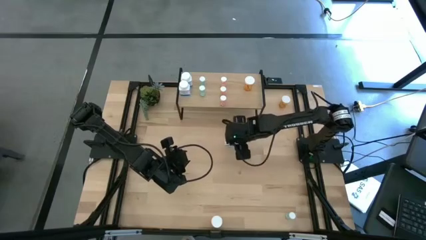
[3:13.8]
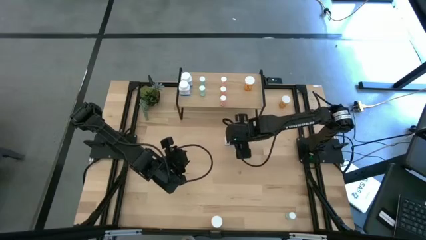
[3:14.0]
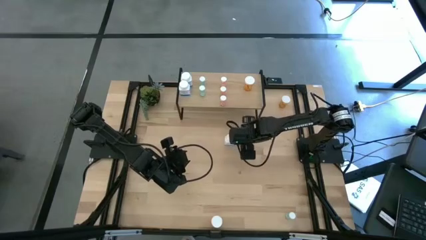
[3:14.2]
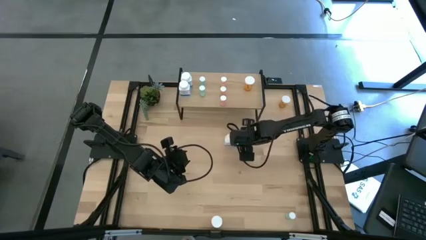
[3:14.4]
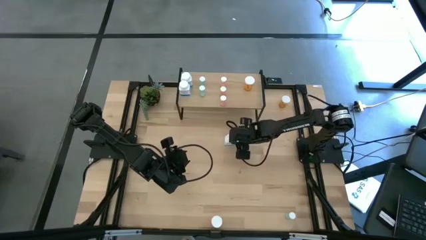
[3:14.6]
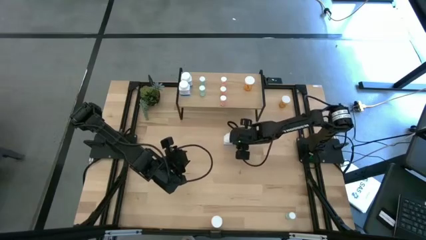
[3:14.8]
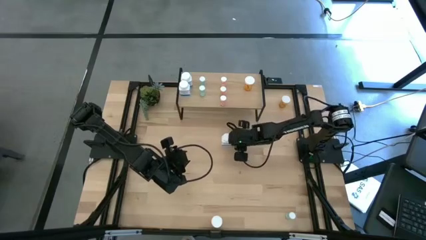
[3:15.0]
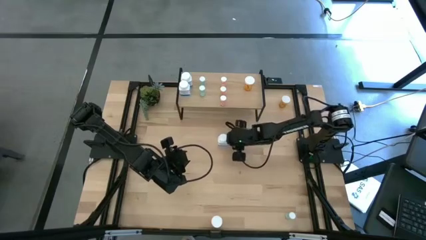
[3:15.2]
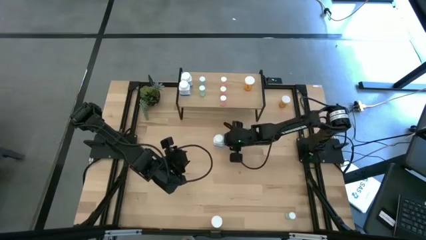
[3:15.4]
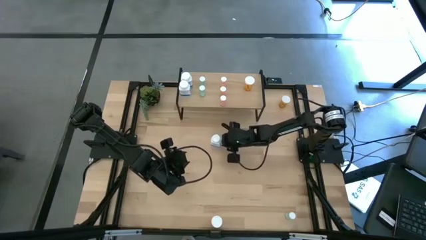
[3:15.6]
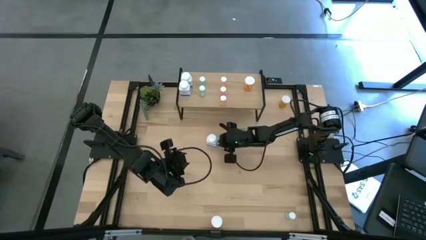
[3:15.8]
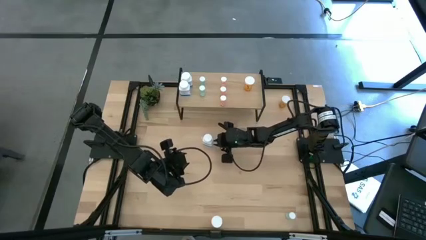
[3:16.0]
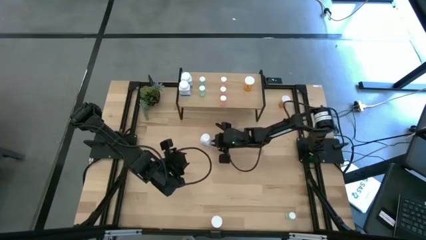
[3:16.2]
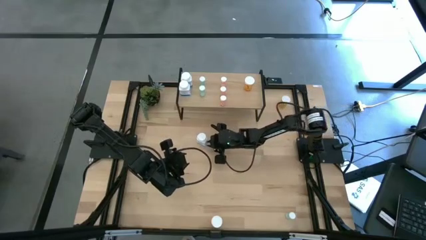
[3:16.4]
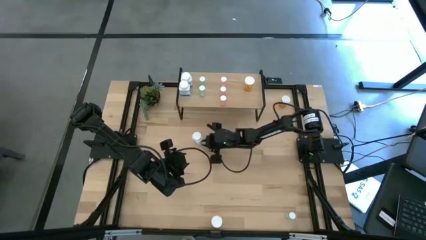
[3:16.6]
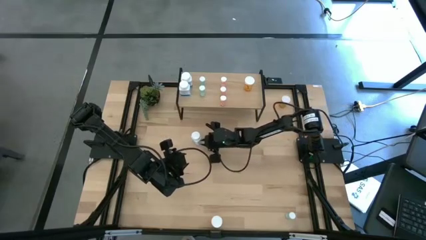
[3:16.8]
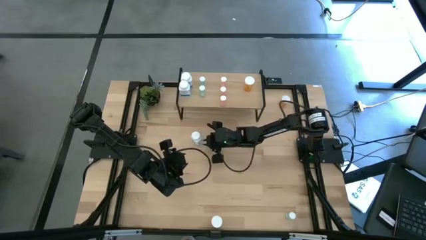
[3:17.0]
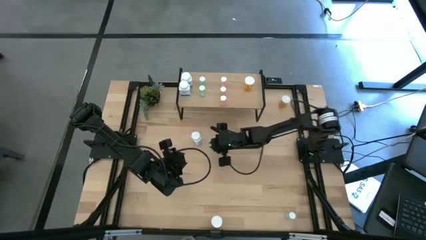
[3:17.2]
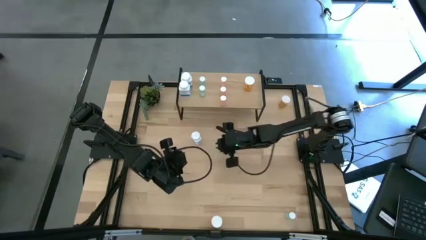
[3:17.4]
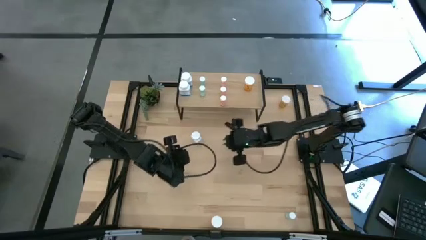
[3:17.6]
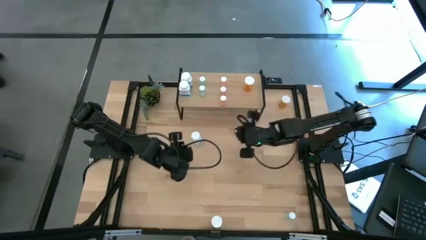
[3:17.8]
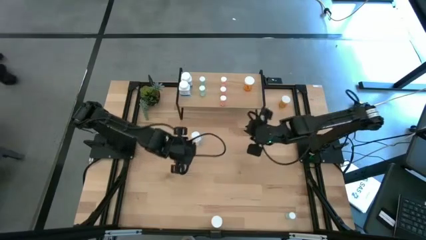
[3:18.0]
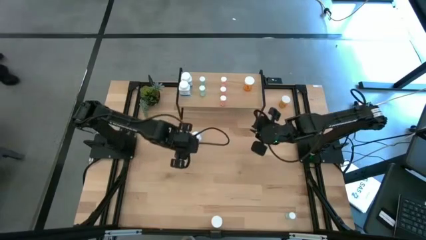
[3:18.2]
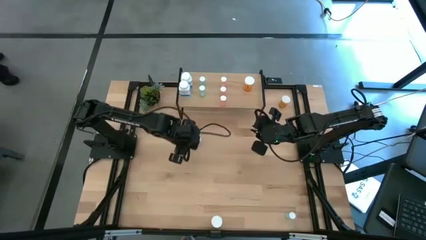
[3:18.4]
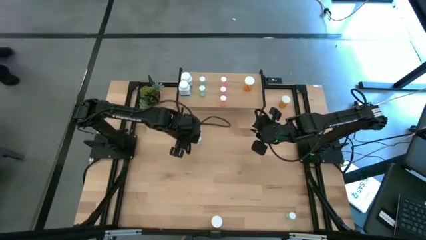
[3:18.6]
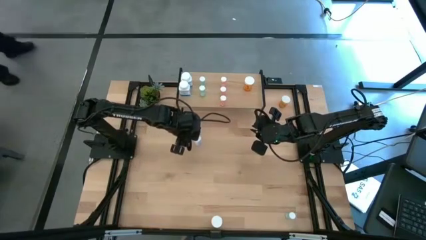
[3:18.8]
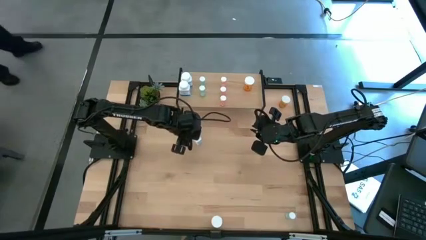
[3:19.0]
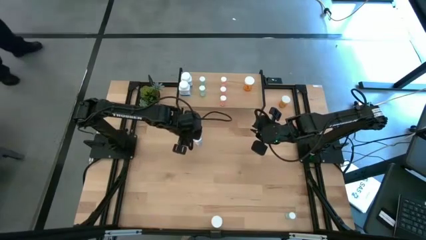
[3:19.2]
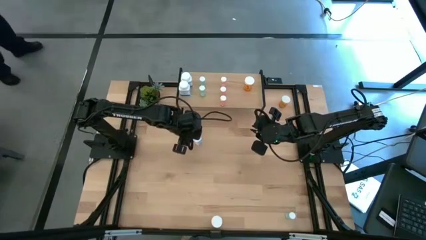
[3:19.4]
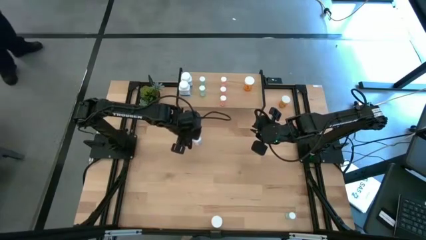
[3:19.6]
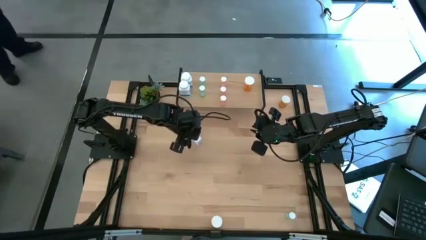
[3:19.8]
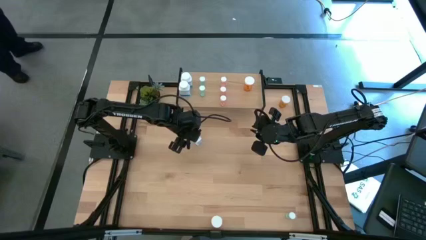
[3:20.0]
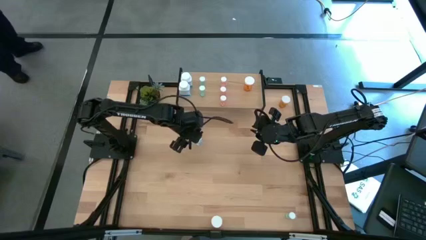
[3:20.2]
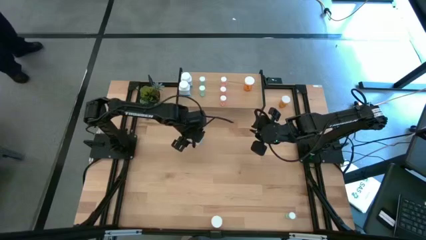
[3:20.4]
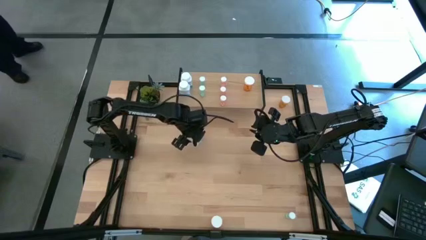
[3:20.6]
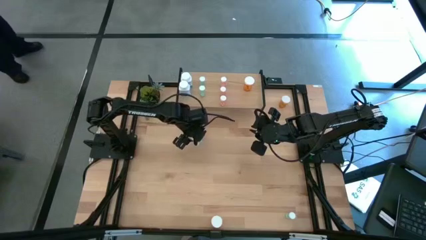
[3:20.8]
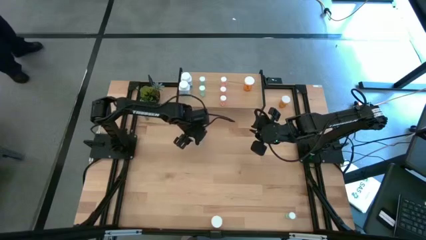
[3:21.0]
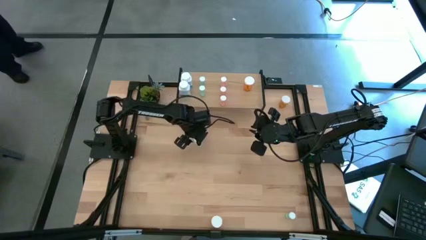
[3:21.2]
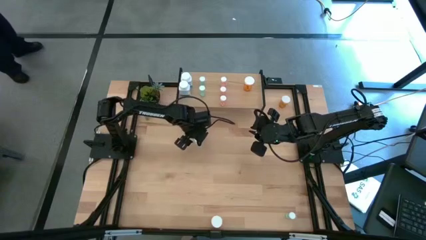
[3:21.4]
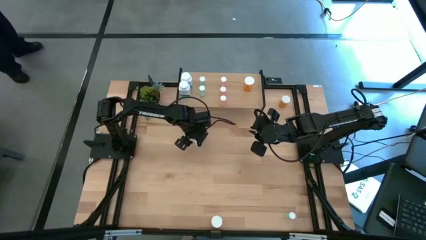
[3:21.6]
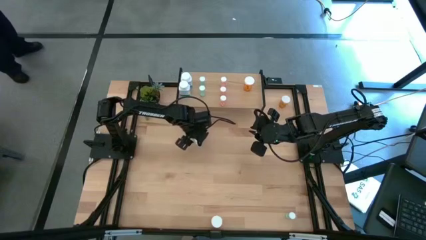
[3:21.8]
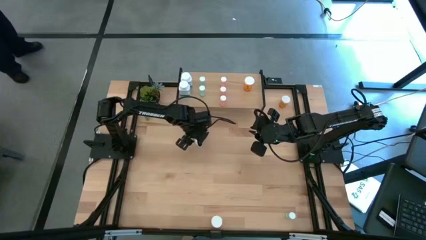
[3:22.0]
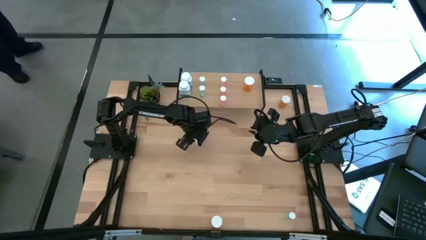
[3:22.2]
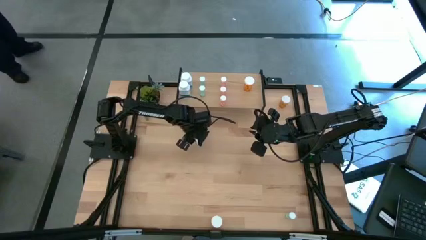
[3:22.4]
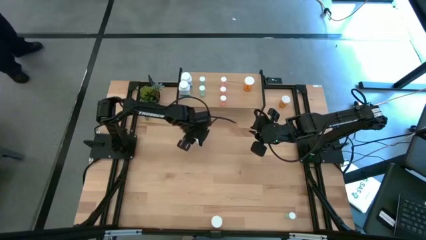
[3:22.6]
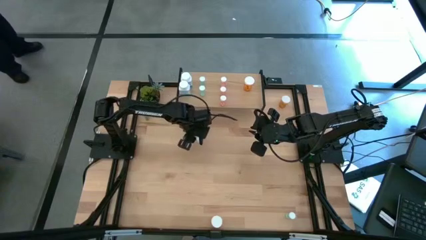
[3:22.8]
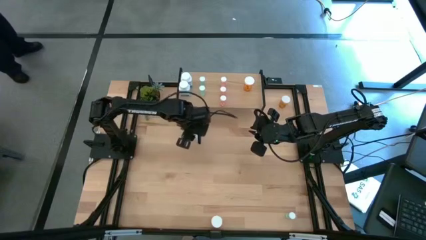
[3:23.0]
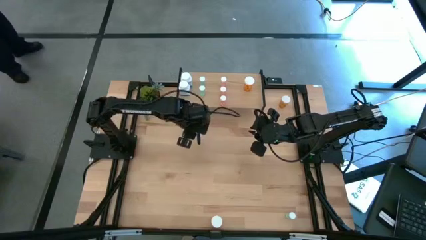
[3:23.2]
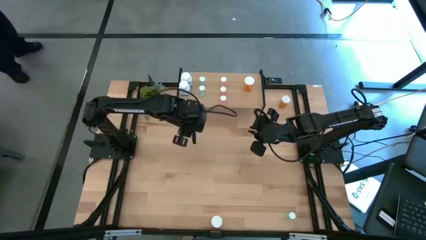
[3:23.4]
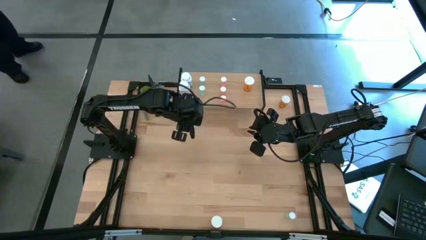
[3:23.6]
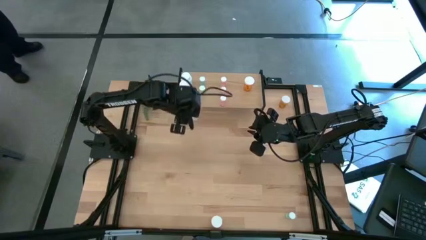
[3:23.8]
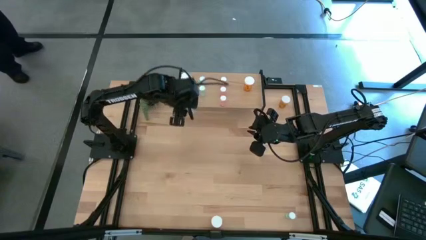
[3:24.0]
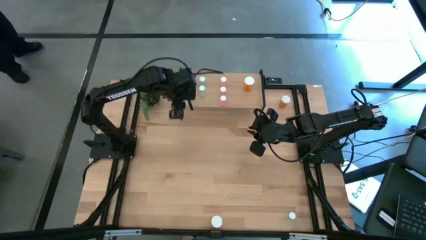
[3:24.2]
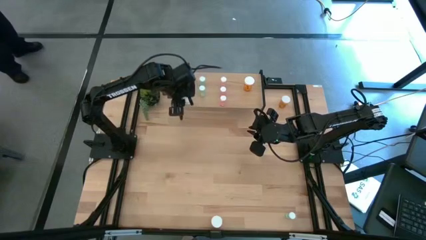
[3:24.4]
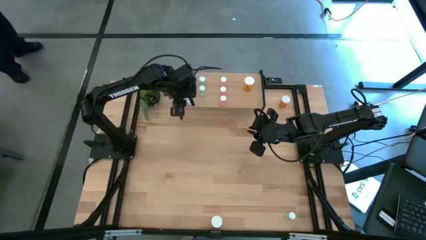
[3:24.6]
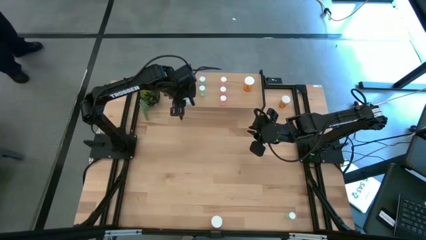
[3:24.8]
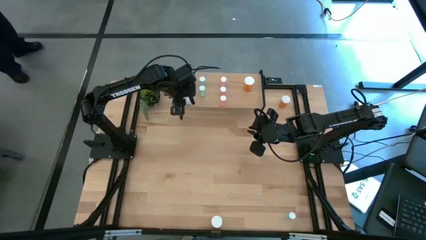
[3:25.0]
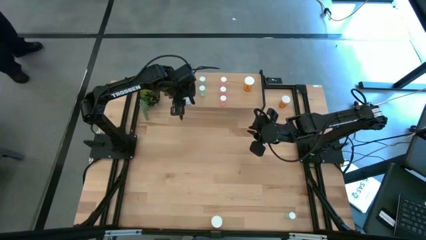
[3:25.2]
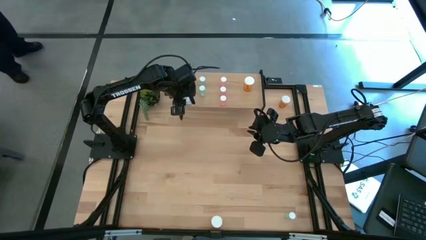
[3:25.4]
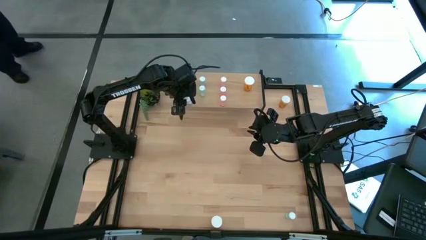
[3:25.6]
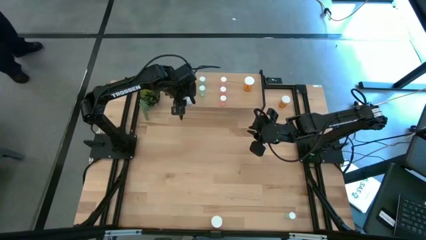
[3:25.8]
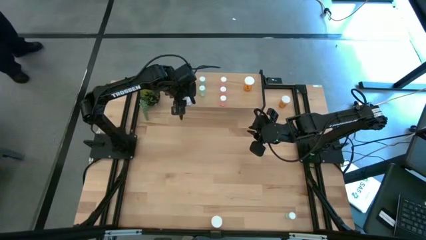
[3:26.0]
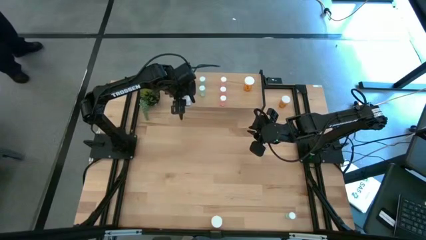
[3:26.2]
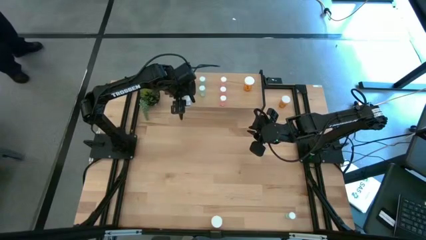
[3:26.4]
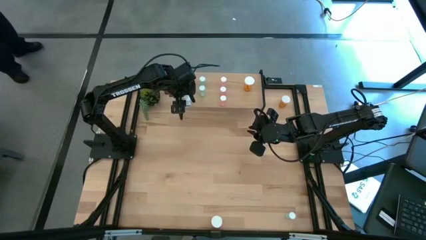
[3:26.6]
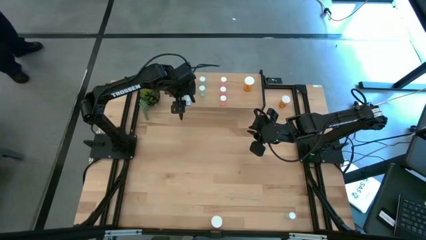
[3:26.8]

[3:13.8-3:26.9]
Task: Pick and place medicine bottles onto shelf by color
Put the white pill bottle on the shelf aligned with the other white pill bottles

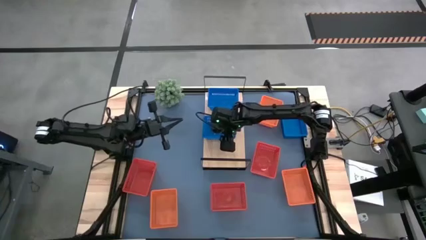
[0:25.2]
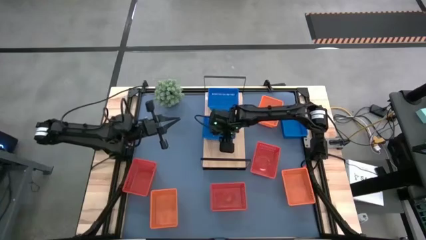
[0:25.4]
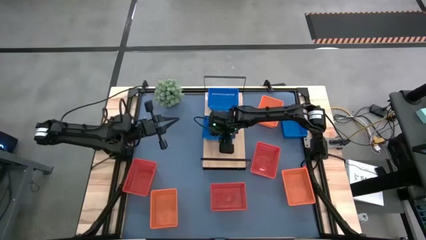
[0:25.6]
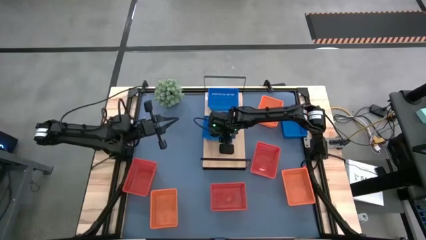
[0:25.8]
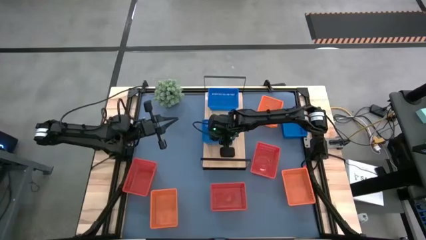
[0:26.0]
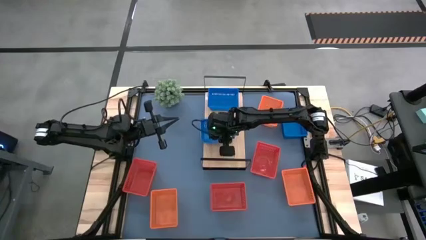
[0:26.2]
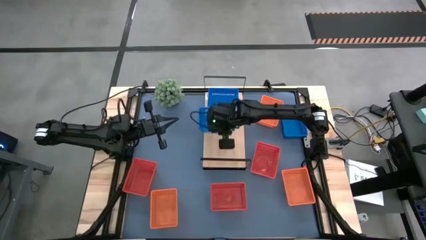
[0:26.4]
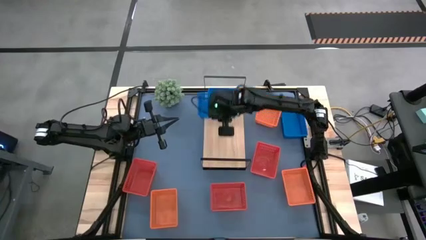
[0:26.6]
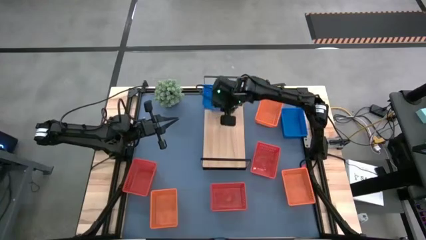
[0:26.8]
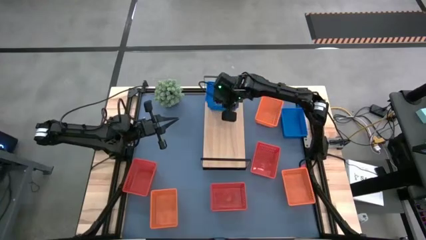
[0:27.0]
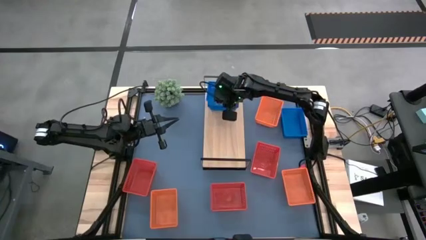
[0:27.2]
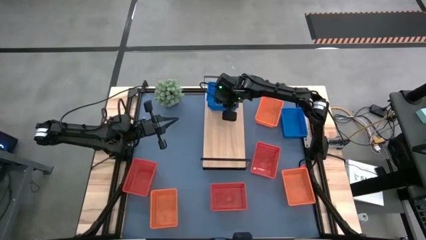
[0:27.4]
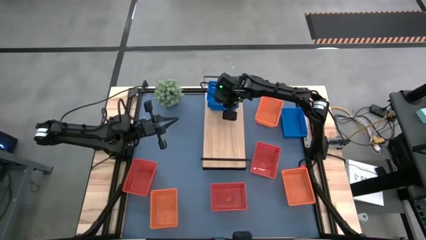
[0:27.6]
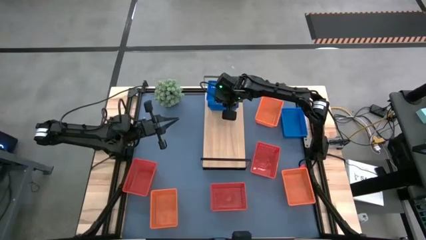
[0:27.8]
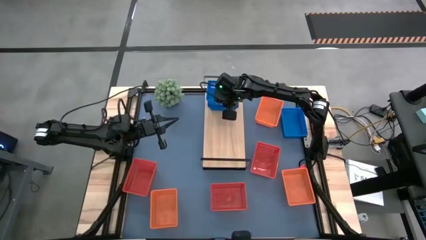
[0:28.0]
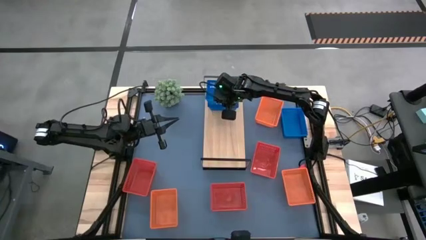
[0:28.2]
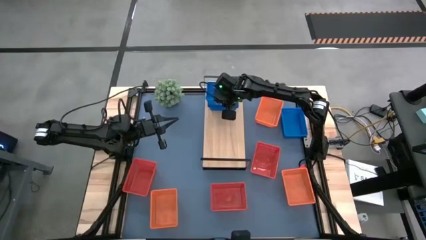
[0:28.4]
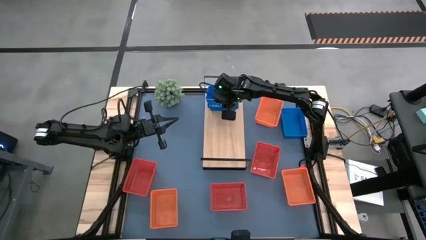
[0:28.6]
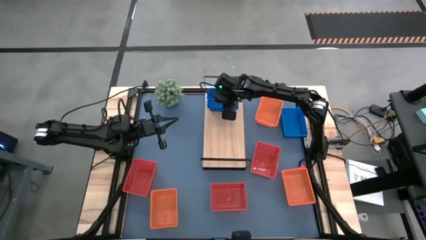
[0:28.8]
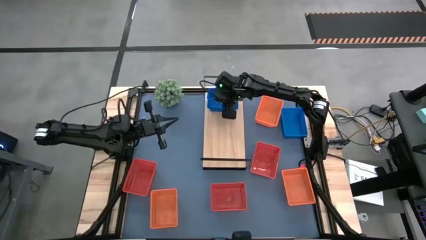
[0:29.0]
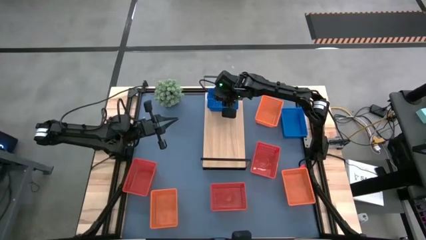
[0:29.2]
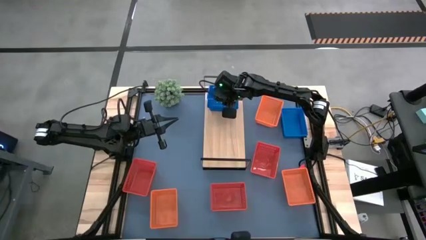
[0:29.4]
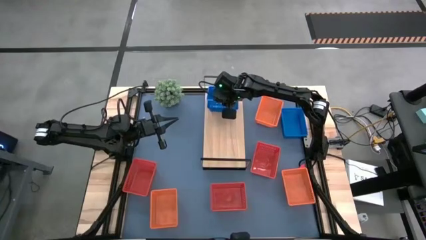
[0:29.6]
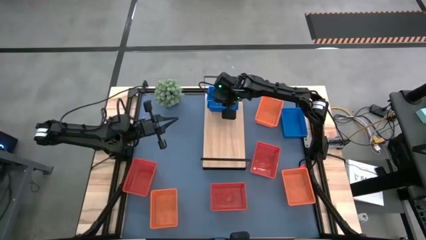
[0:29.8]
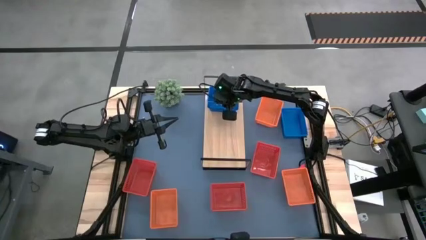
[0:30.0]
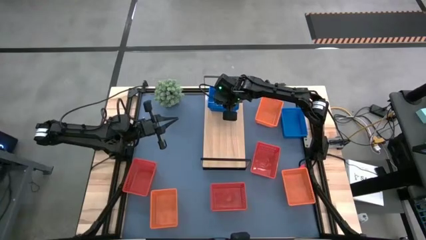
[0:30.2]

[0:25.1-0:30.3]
Task: Stack baskets on shelf by color
Stack the left blue bin on top of the blue bin
